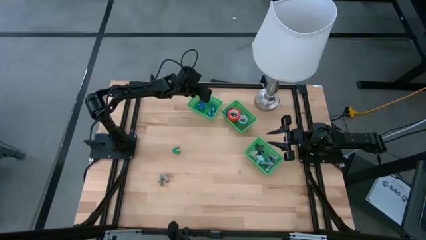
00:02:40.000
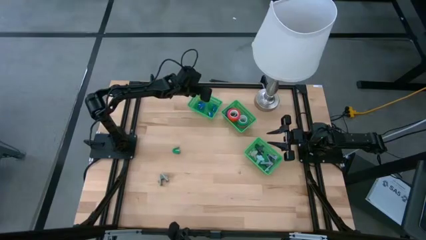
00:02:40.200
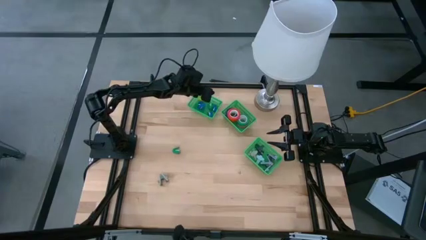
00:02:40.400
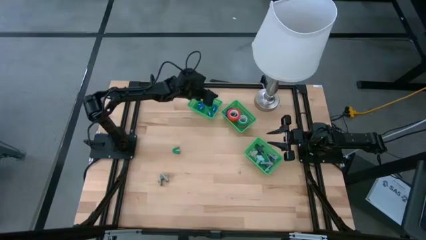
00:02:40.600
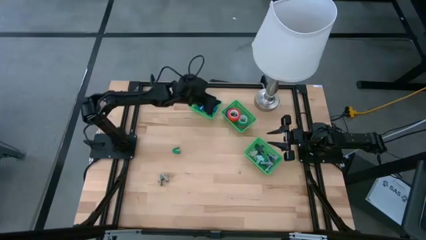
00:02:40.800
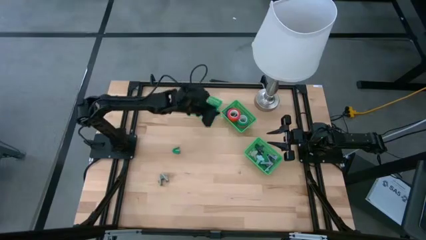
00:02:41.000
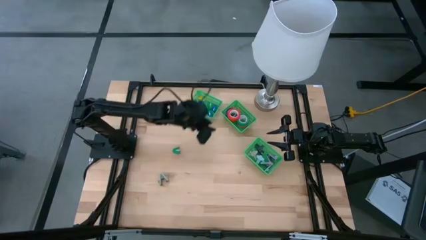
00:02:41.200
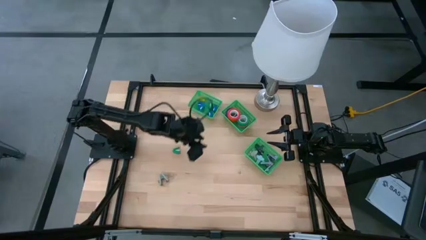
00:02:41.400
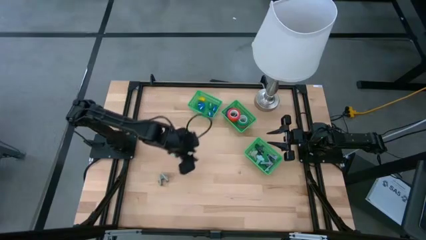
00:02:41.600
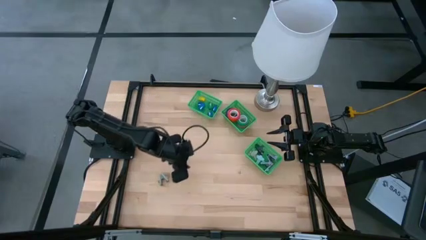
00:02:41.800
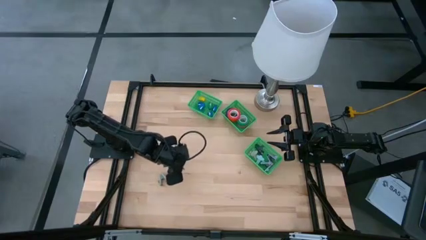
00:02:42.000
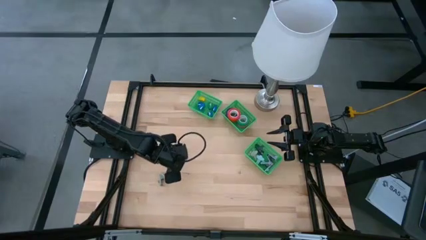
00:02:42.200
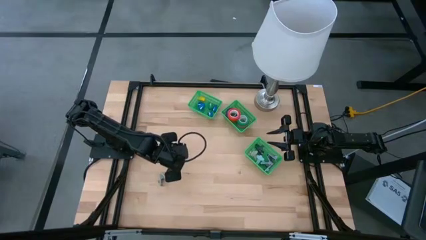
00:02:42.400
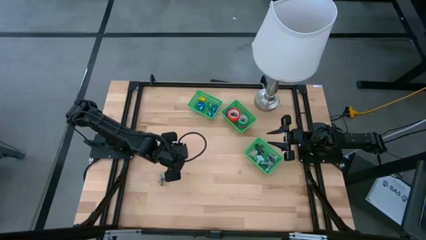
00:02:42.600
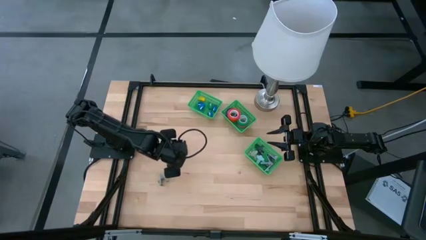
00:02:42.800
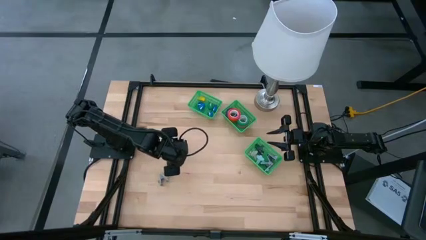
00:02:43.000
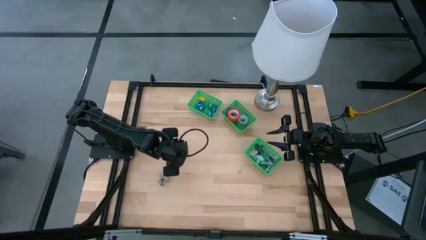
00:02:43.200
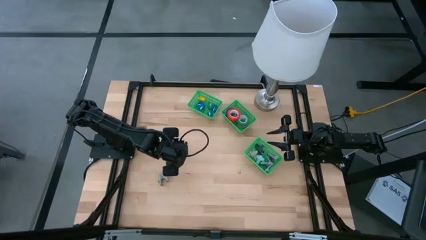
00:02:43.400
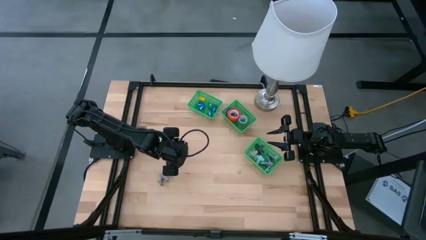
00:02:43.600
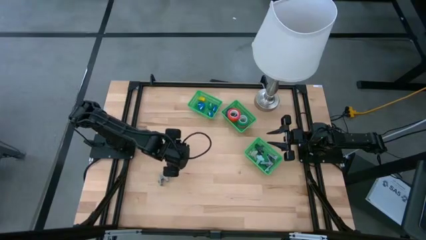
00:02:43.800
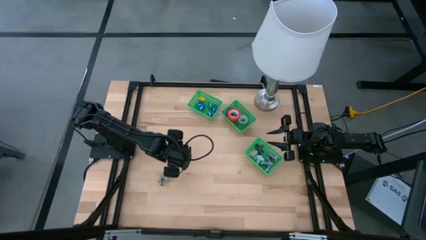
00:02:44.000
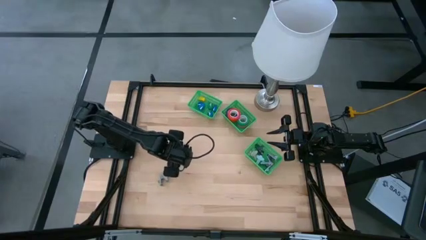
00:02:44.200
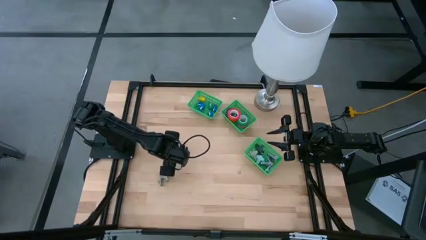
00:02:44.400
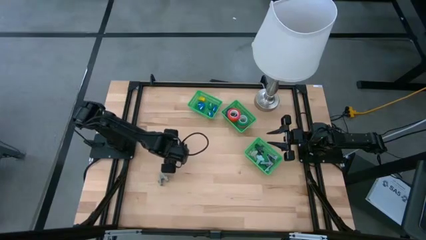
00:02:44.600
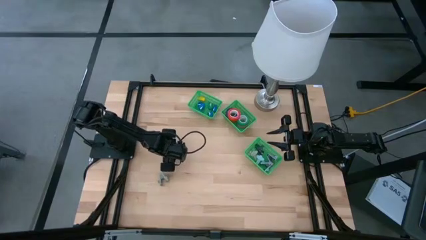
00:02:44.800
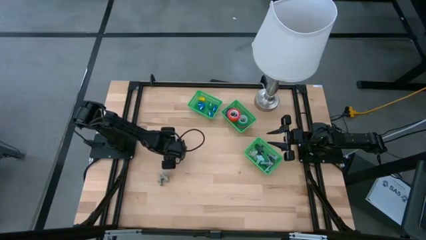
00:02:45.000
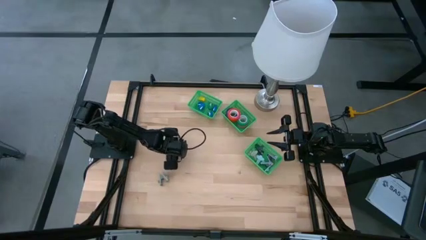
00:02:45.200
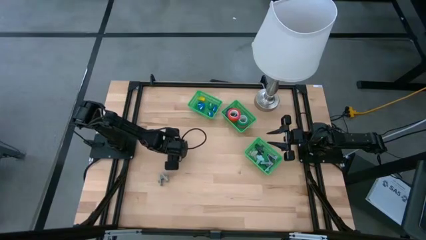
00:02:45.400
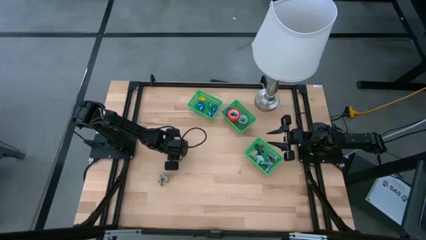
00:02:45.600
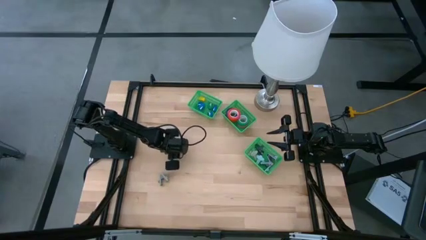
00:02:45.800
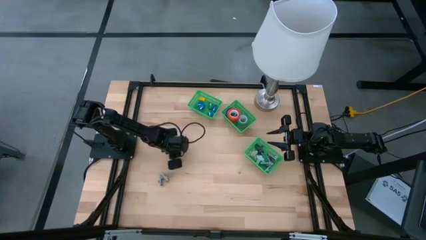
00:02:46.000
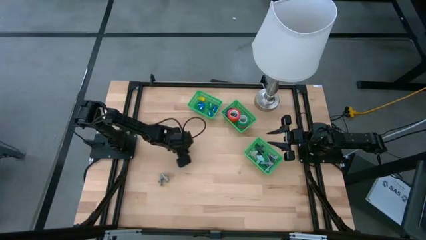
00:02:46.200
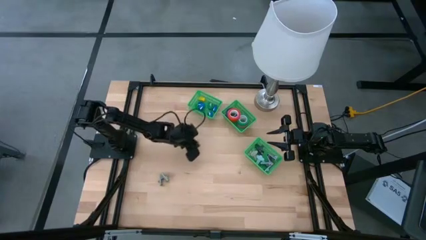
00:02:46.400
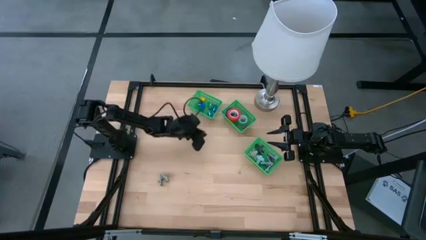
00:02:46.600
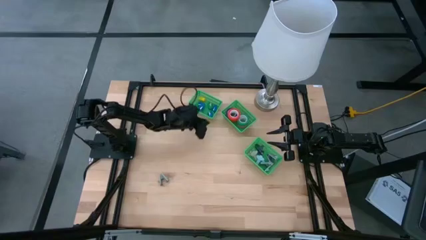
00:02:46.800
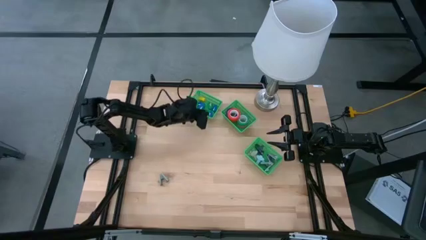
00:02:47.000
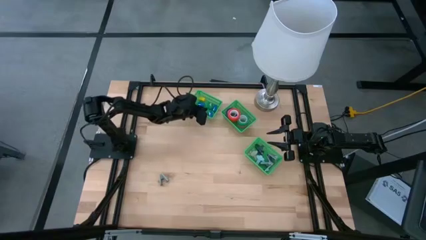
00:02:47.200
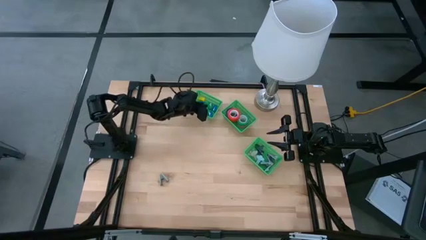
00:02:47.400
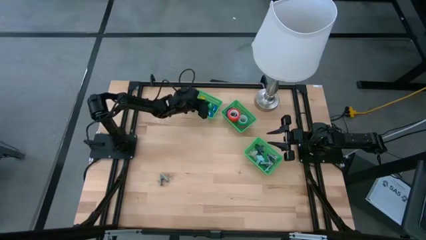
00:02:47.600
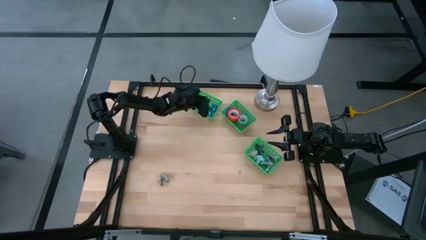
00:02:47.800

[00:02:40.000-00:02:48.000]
Task: Pick and place Stapler, Stapler remover, tape
Put the green stapler into the top basket

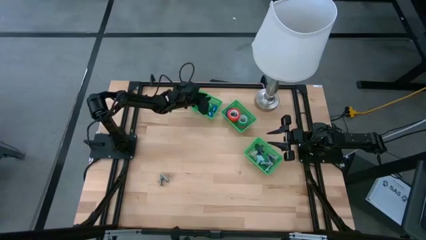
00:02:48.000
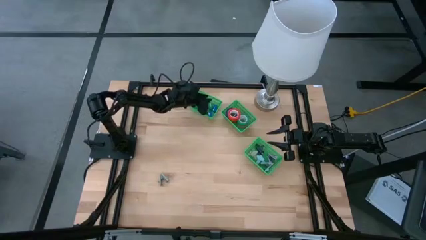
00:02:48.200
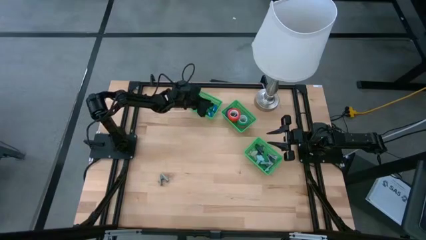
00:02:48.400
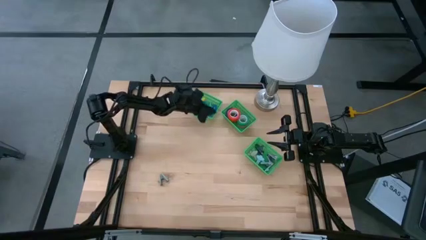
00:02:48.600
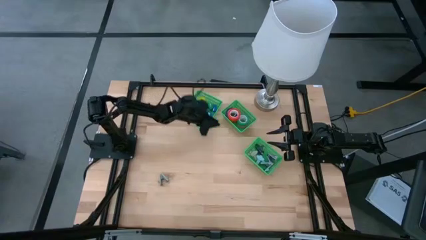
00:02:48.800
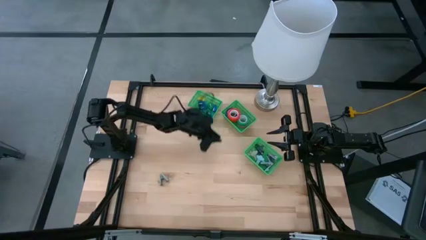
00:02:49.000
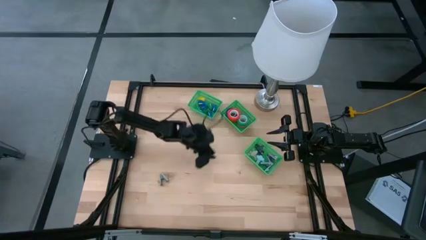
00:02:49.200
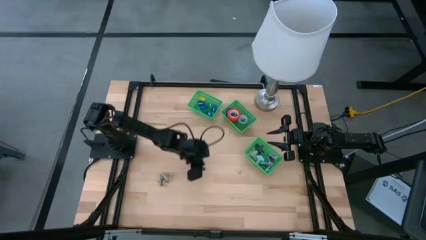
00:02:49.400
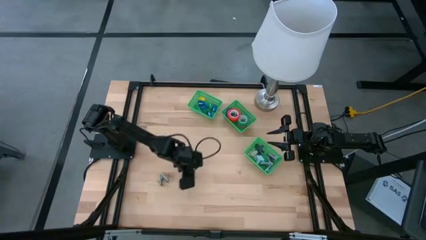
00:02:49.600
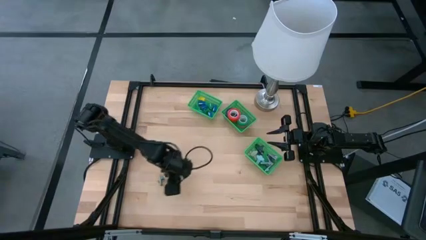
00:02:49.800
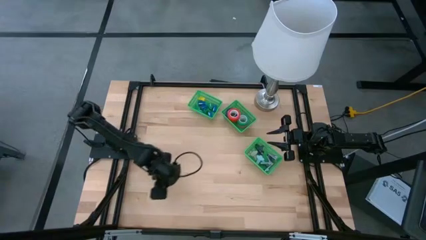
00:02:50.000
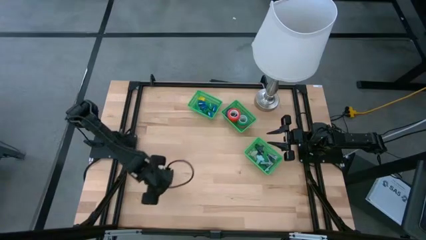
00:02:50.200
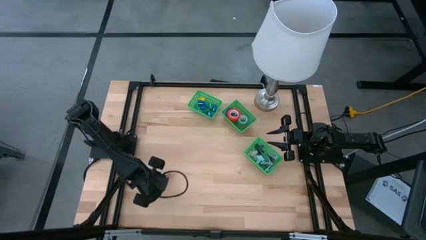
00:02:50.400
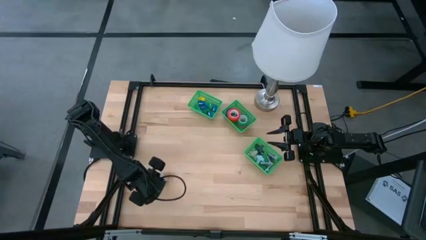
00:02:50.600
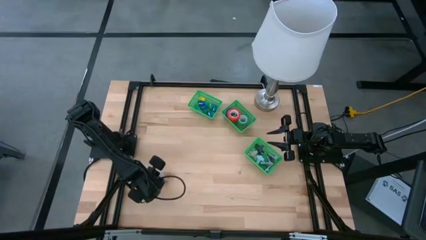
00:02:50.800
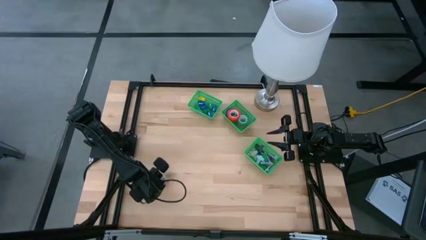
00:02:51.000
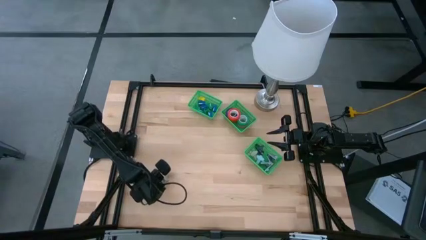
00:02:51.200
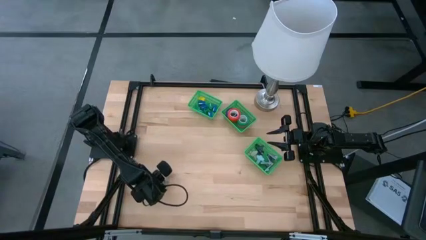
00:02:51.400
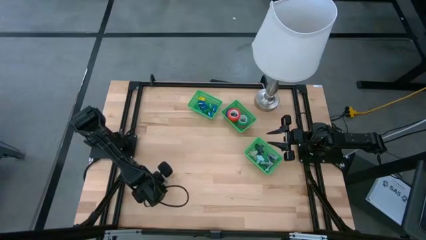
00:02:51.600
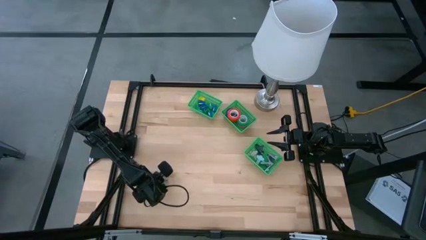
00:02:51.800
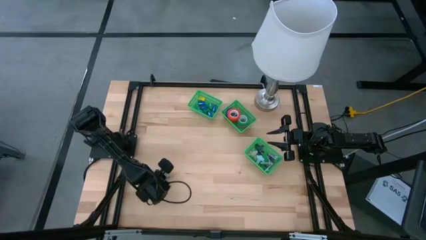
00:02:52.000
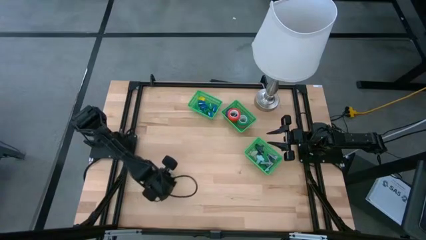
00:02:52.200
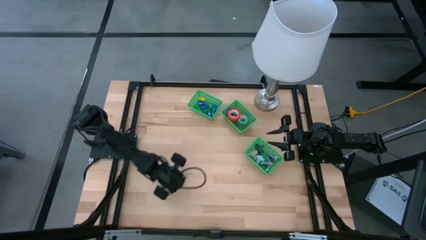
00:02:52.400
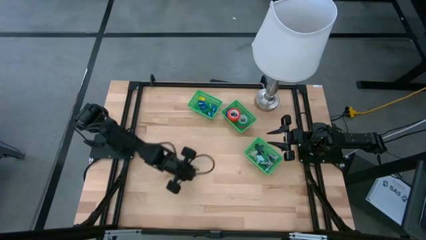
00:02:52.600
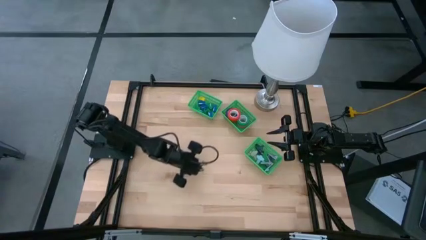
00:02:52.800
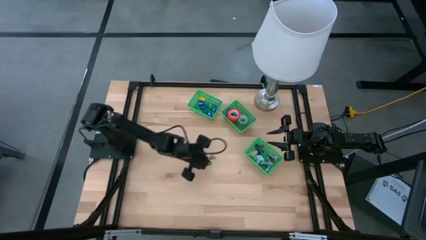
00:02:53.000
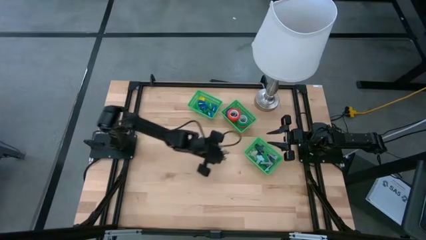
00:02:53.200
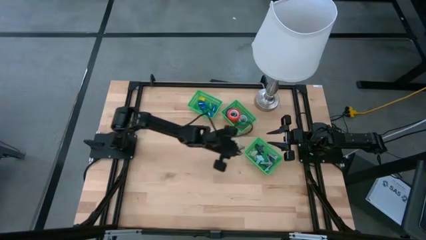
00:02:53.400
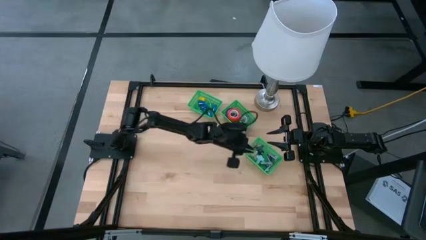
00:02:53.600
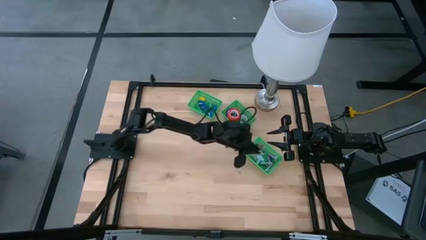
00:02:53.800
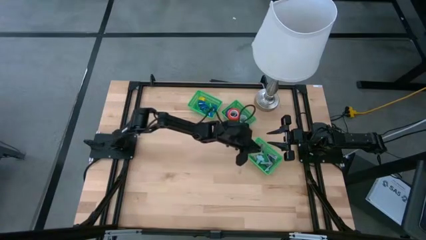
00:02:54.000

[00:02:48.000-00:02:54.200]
Put the gray staple remover into the bottom basket
